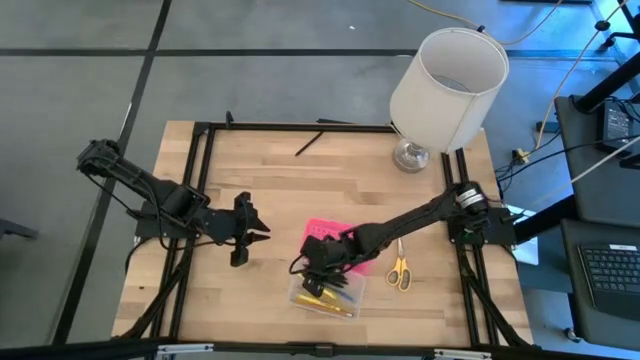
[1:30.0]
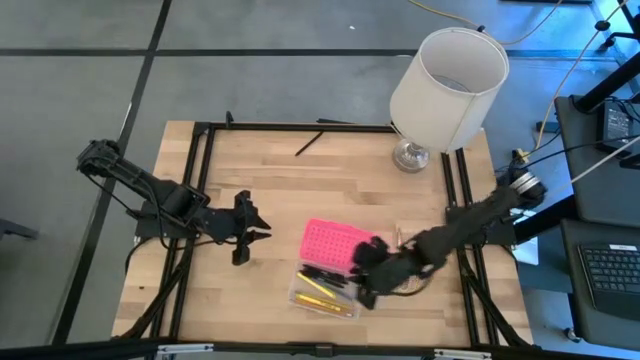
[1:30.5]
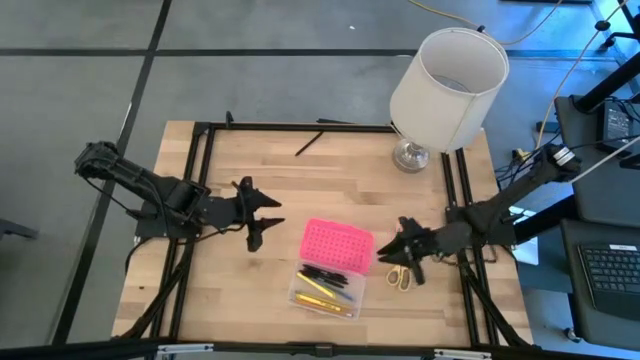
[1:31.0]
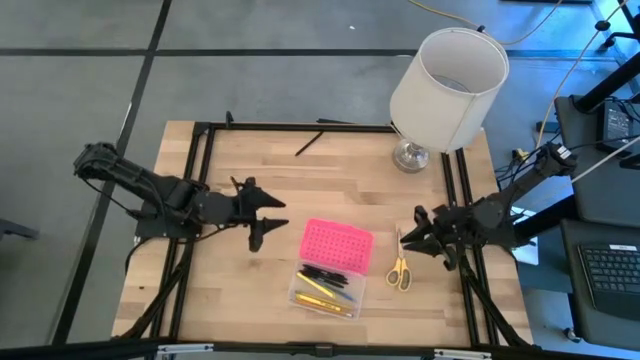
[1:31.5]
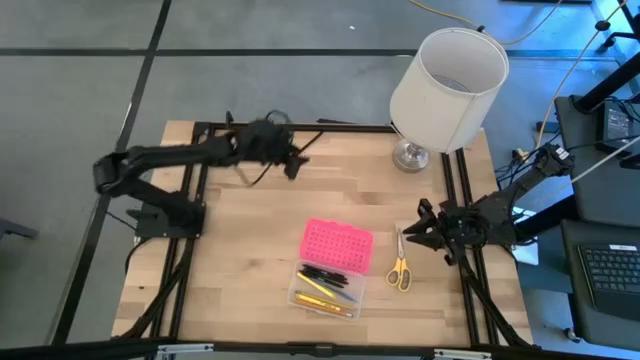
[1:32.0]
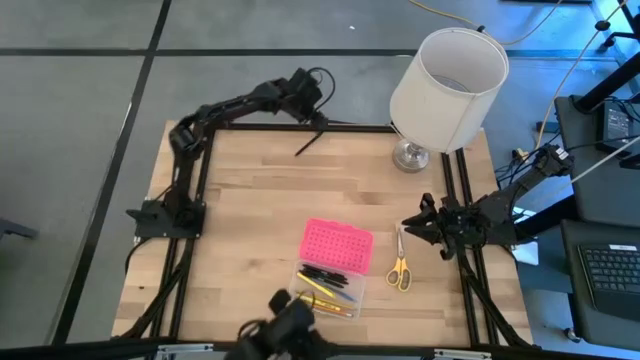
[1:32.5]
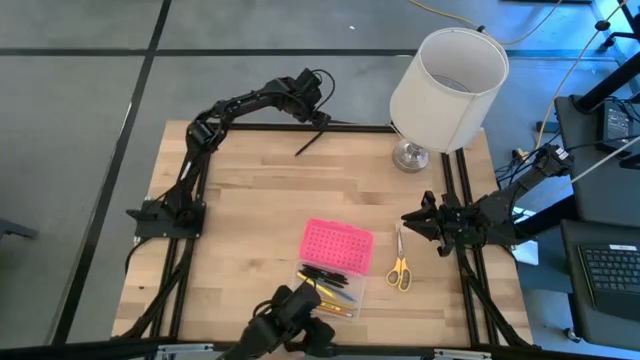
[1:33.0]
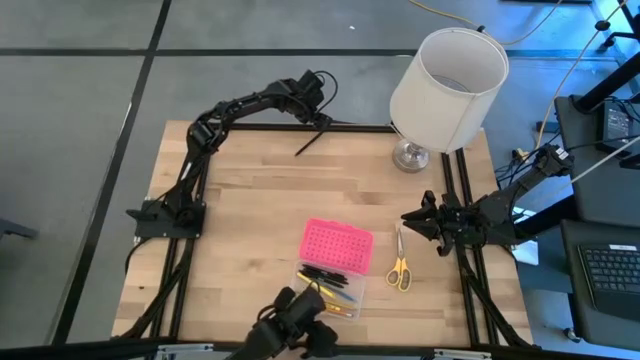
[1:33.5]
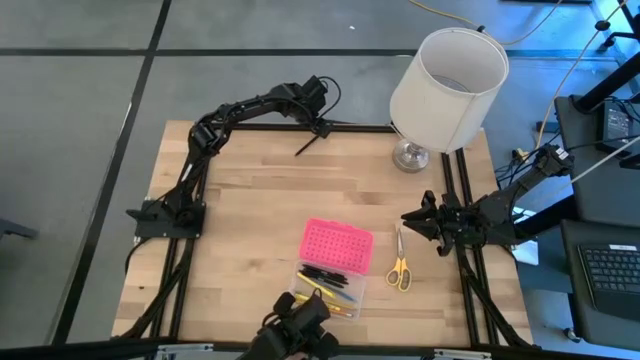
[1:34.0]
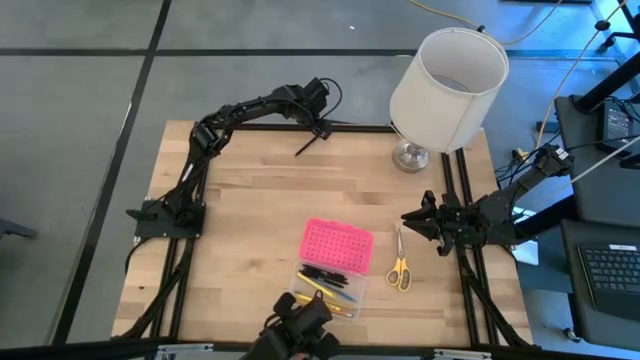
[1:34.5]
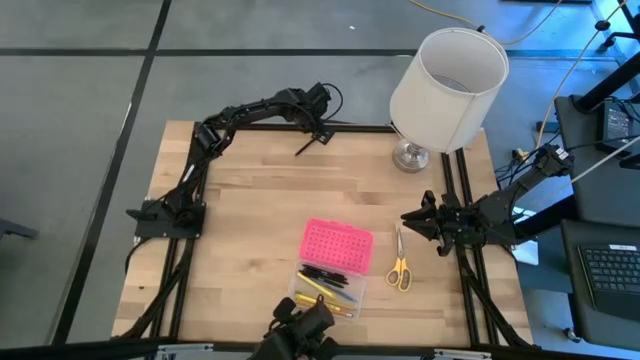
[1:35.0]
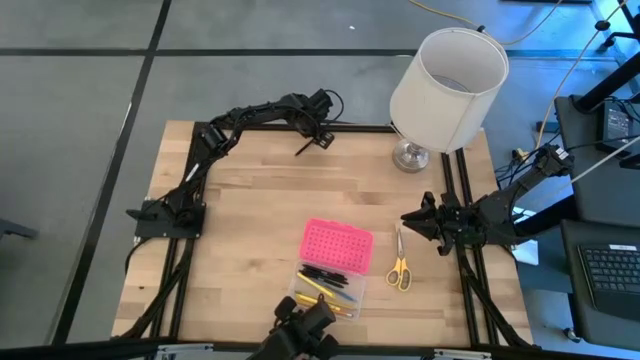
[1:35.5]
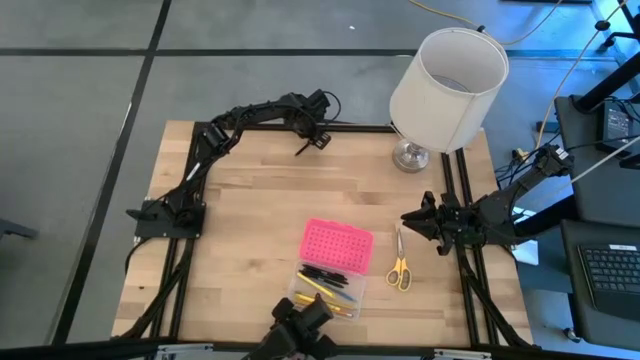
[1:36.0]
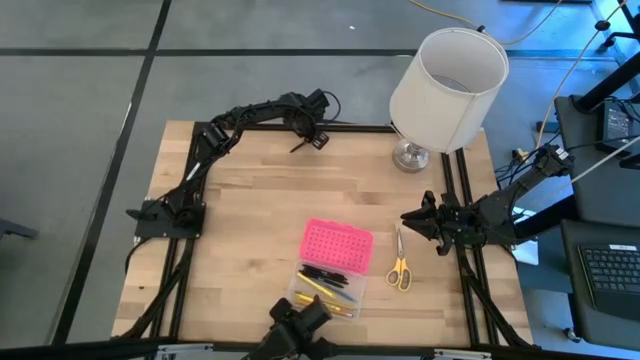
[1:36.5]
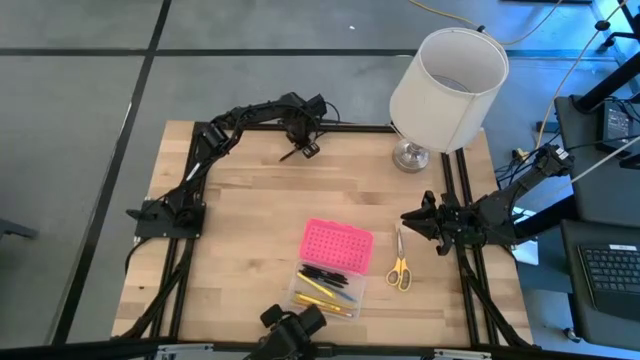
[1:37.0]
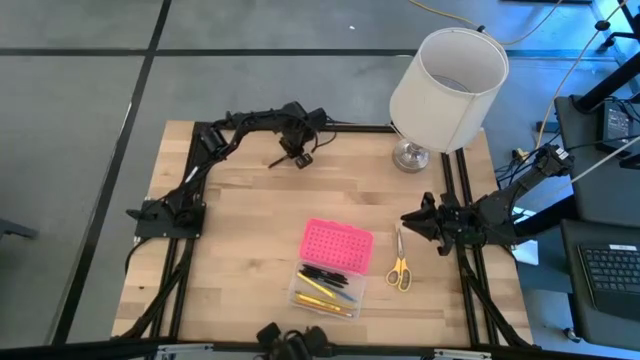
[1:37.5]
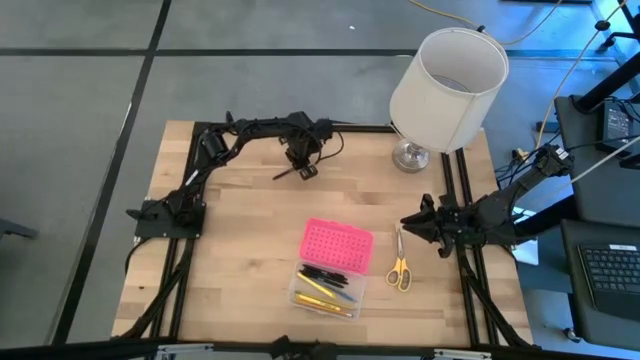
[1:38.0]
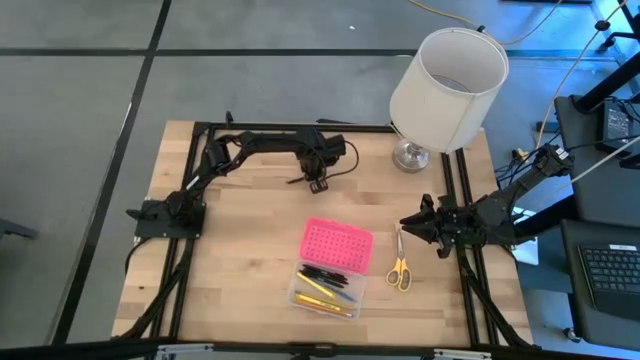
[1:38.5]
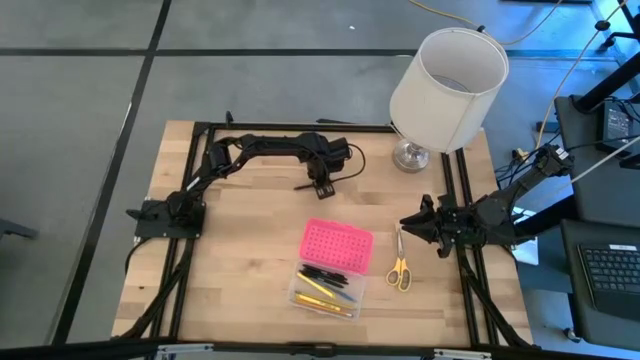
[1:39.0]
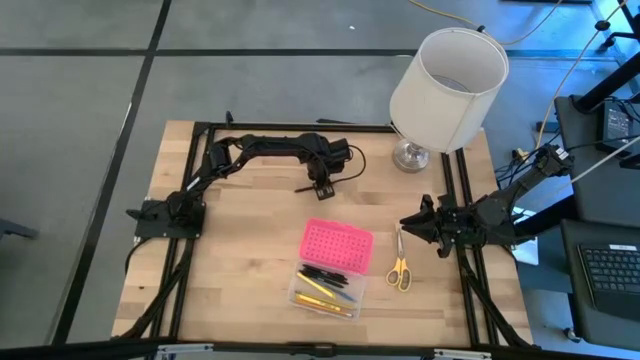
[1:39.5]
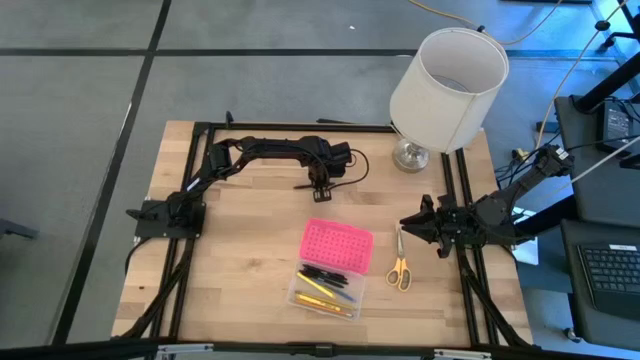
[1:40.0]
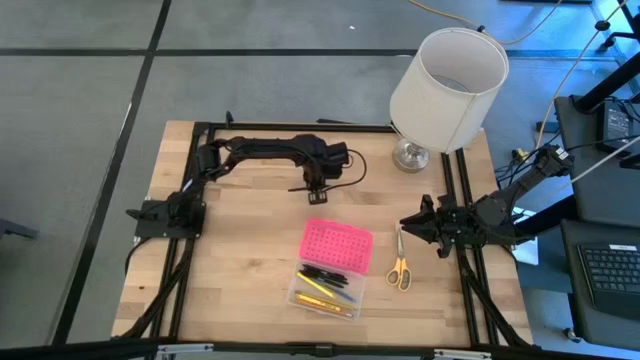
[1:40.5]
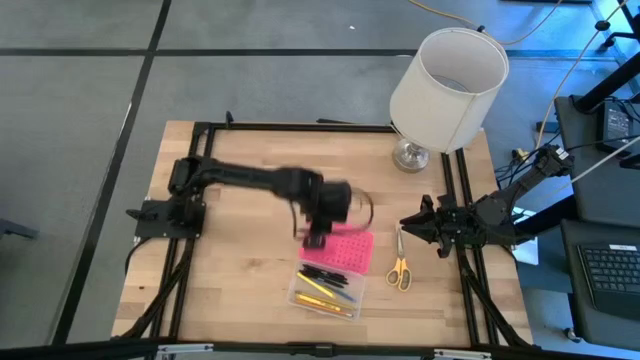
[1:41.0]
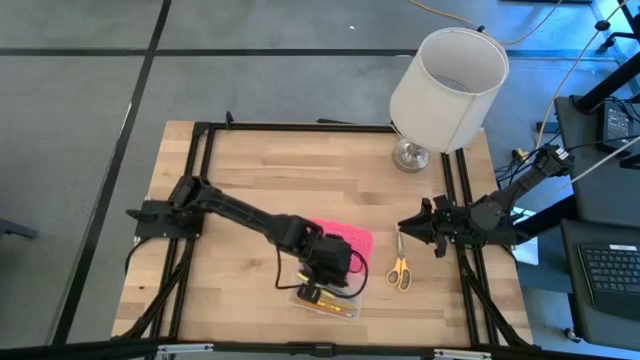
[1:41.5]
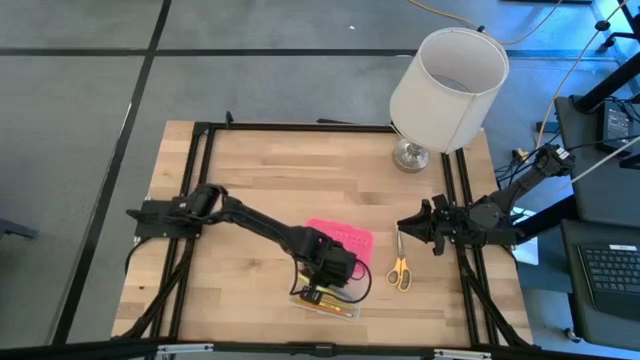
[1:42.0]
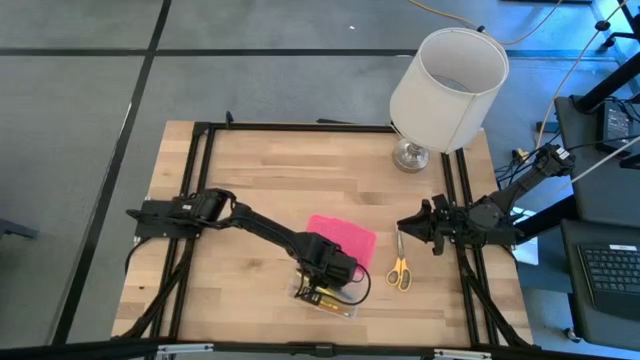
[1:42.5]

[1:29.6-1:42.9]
Task: Pick & place school supplies into a supply box
Put the black pen into the pink supply box

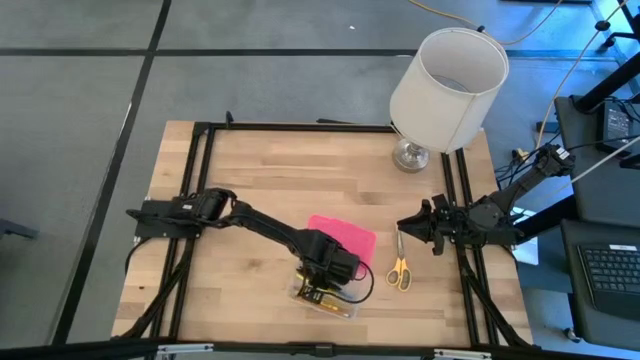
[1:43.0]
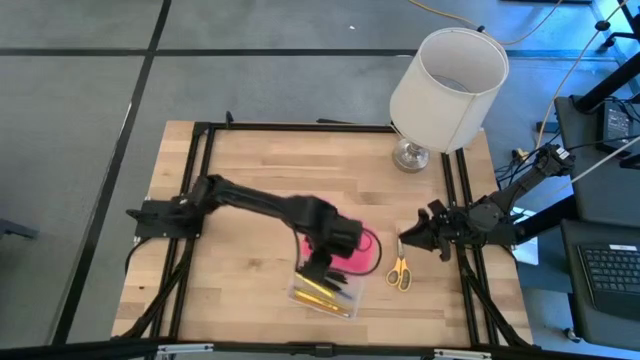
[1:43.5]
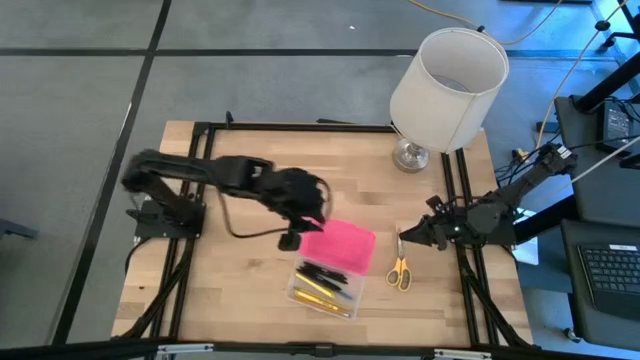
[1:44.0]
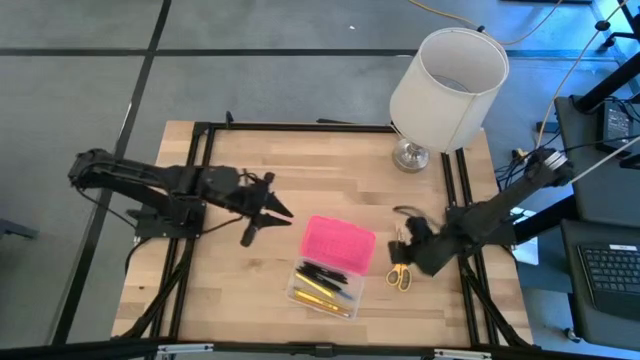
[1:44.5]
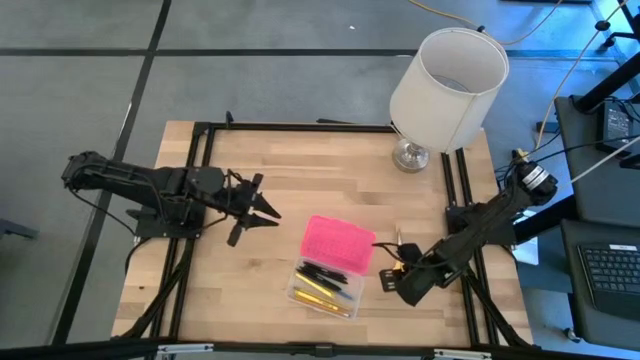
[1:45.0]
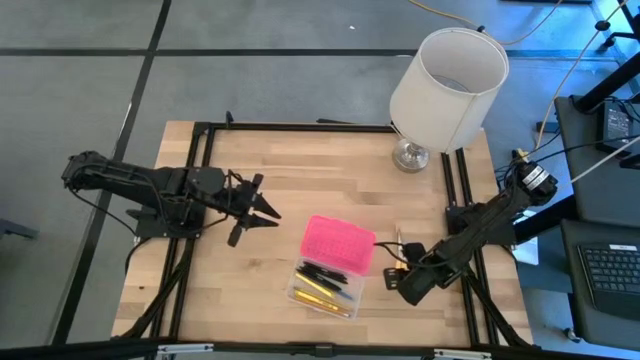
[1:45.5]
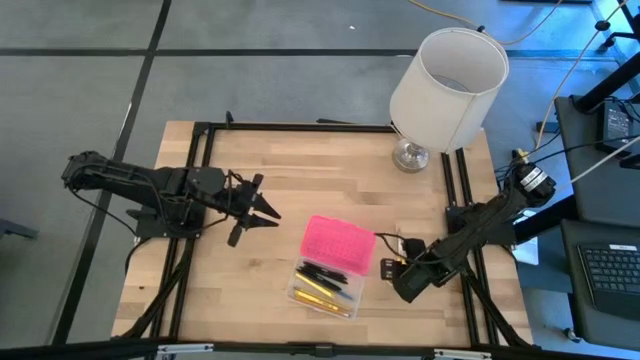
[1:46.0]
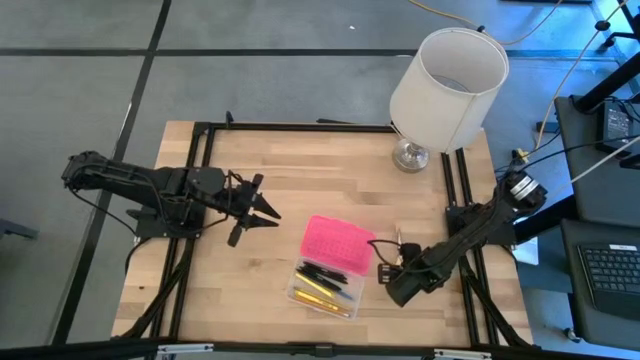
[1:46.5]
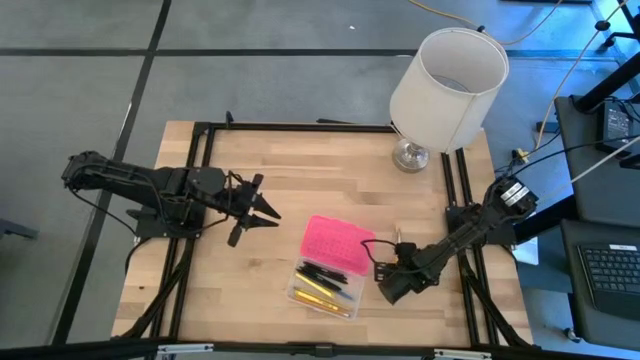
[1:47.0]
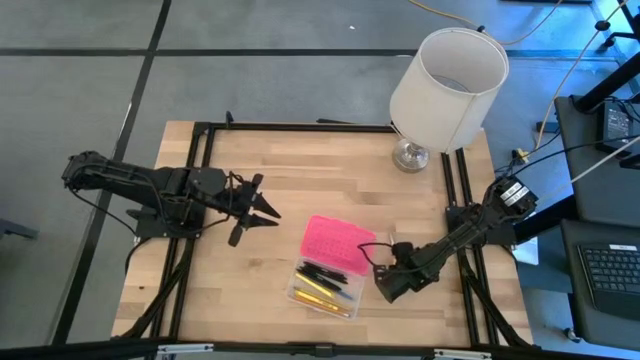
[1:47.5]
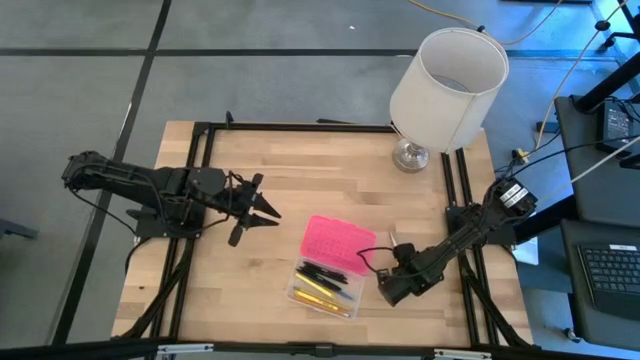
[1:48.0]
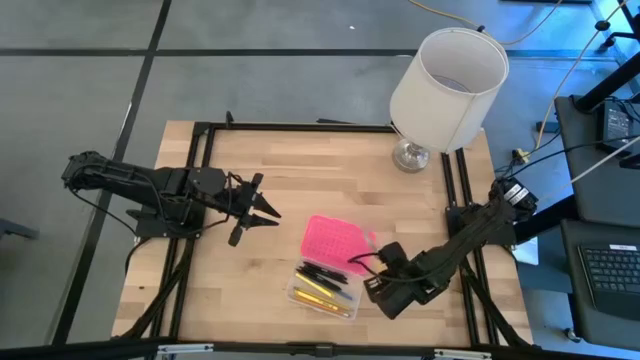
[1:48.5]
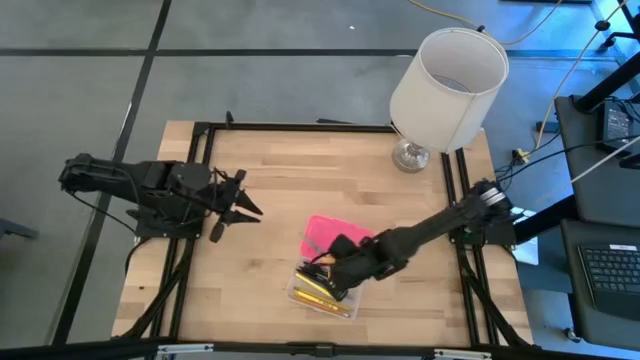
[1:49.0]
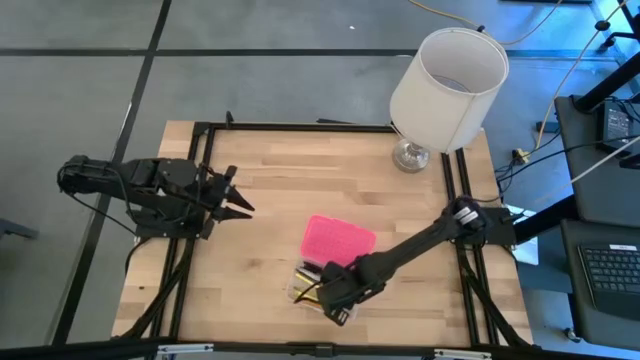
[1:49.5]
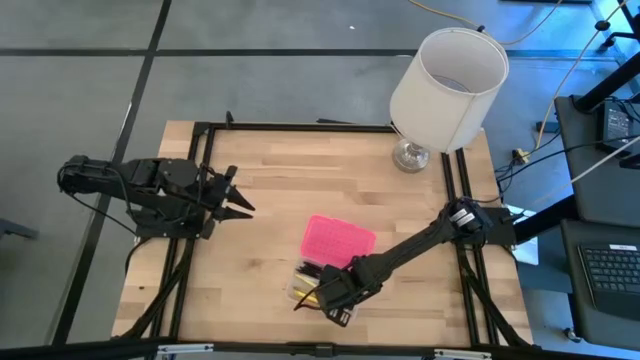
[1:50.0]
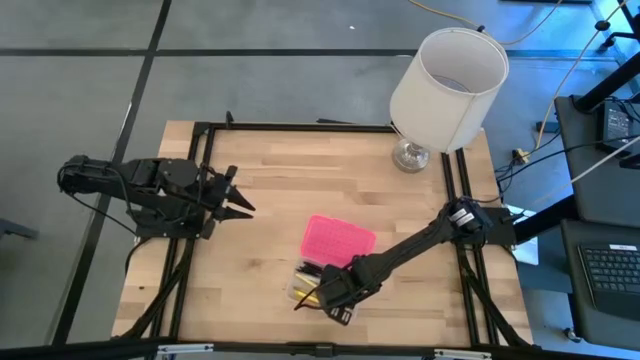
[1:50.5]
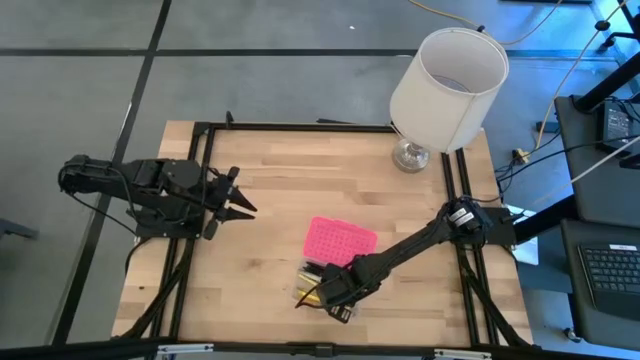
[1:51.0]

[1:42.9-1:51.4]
Put the yellow scissors into the pink supply box

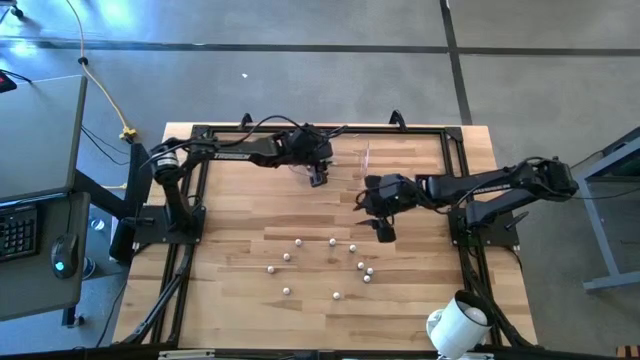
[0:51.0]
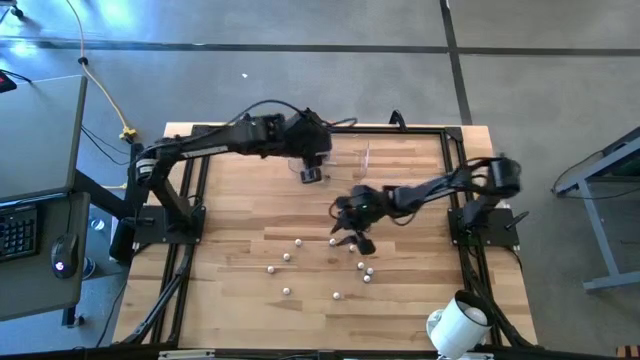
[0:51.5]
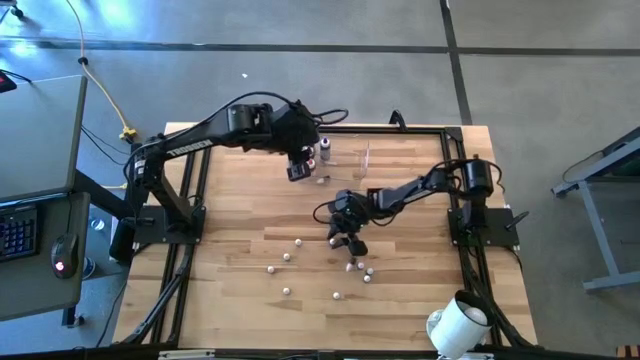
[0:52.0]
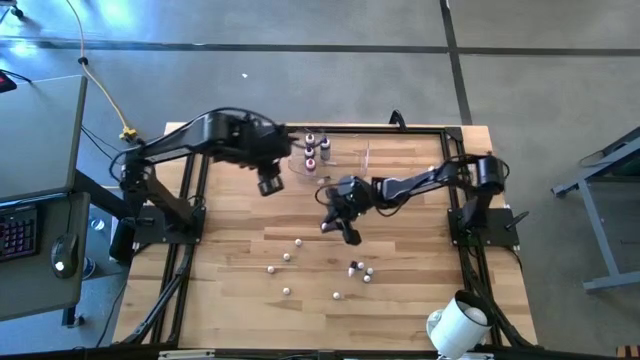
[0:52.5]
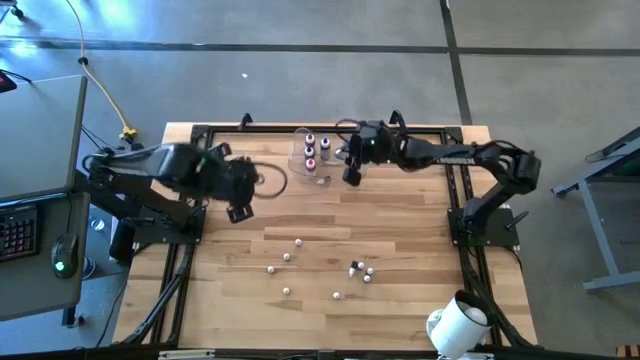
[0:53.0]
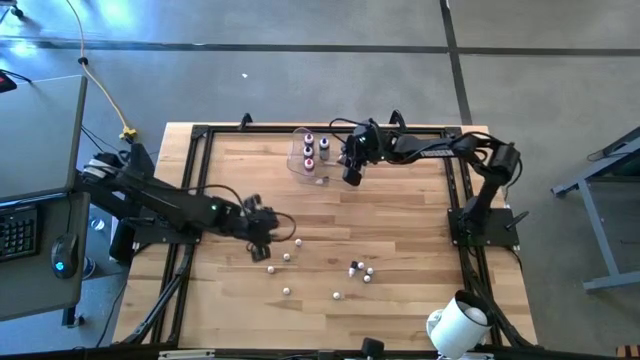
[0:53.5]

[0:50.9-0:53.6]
Task: Pick & Place food coloring
Put the green food coloring into the transparent bin
